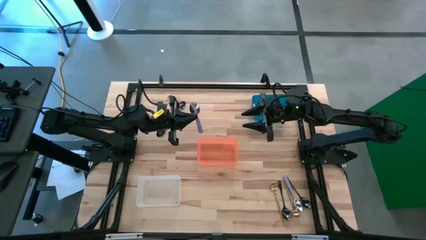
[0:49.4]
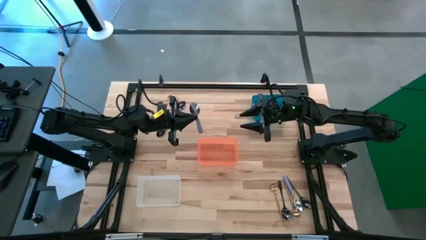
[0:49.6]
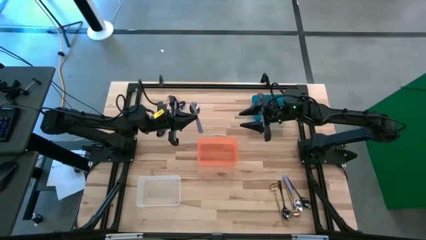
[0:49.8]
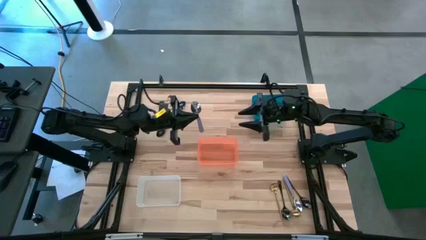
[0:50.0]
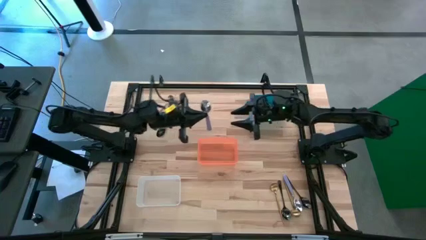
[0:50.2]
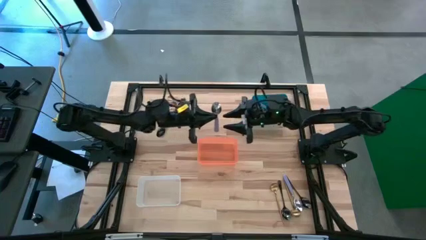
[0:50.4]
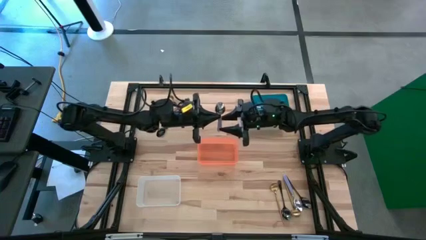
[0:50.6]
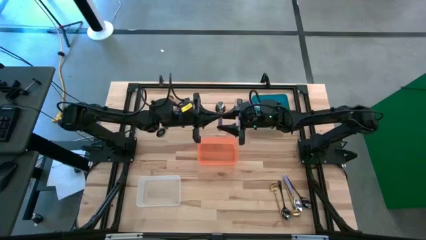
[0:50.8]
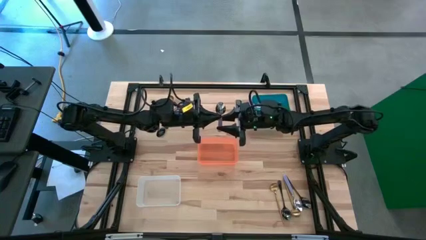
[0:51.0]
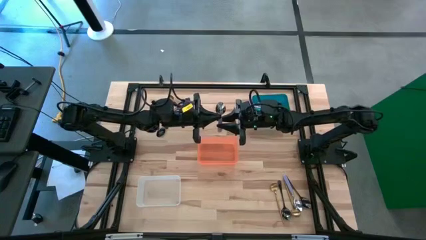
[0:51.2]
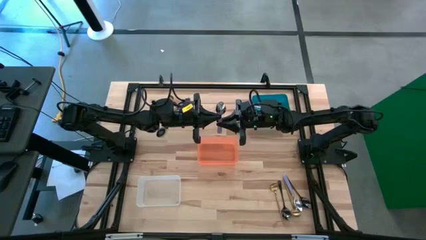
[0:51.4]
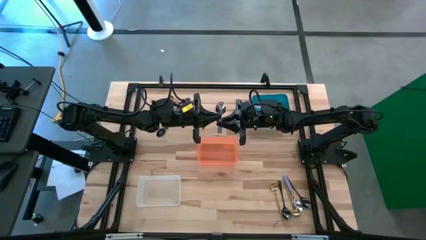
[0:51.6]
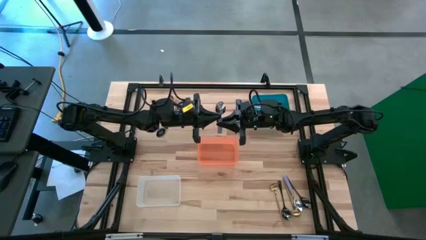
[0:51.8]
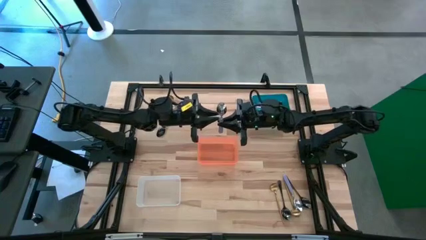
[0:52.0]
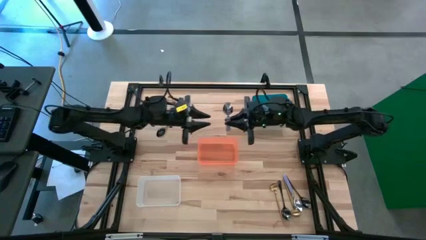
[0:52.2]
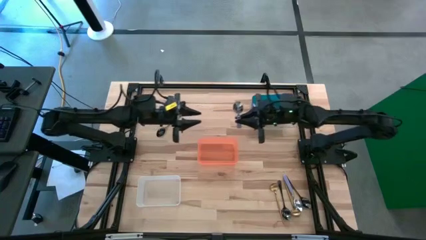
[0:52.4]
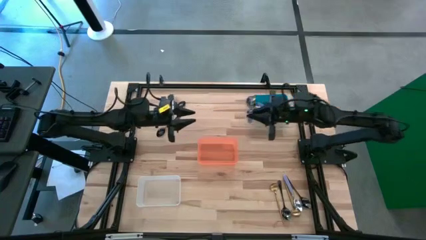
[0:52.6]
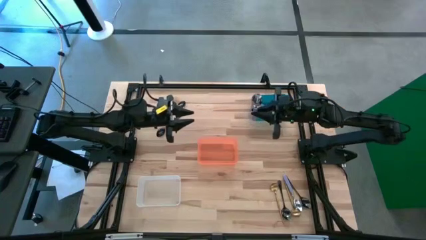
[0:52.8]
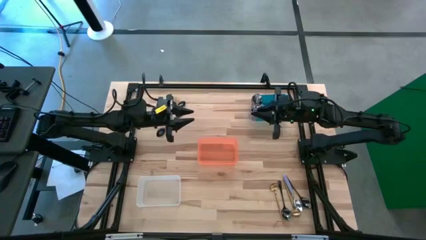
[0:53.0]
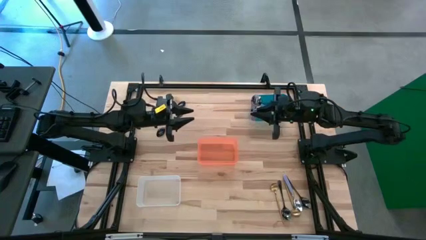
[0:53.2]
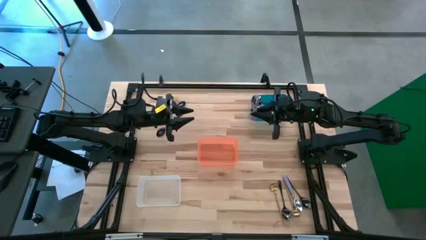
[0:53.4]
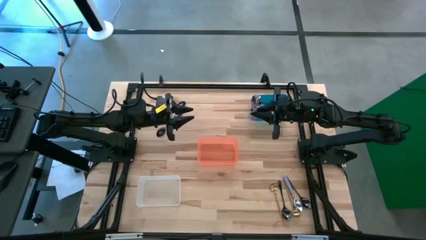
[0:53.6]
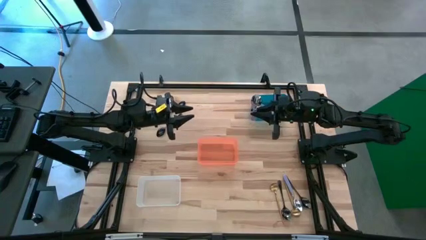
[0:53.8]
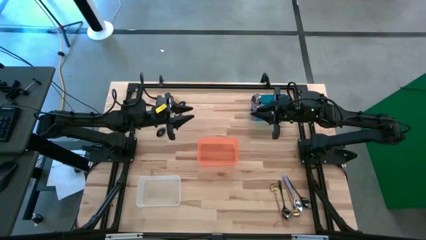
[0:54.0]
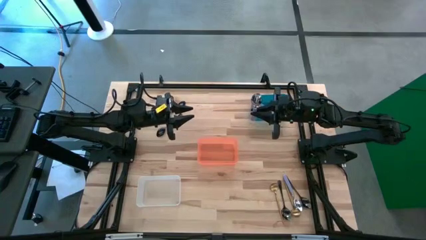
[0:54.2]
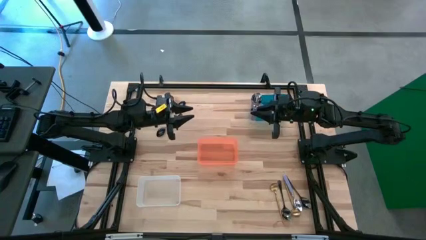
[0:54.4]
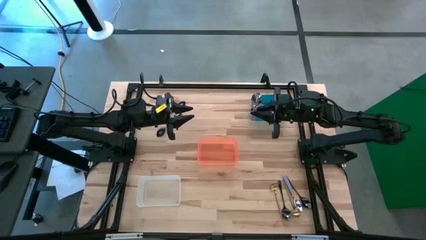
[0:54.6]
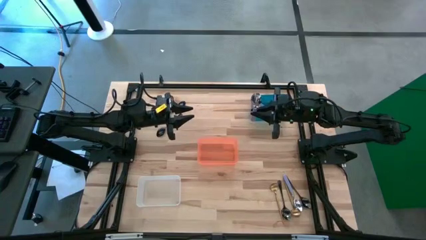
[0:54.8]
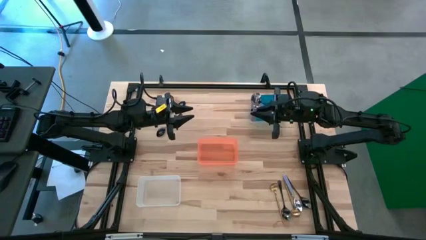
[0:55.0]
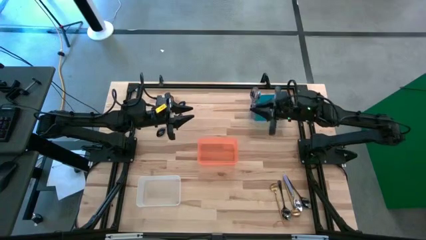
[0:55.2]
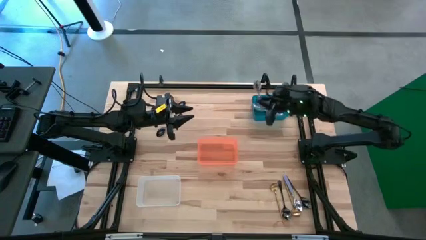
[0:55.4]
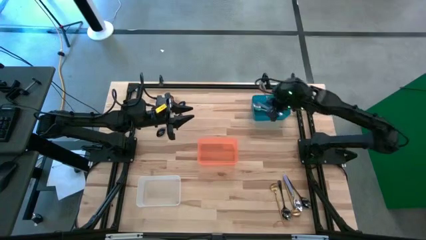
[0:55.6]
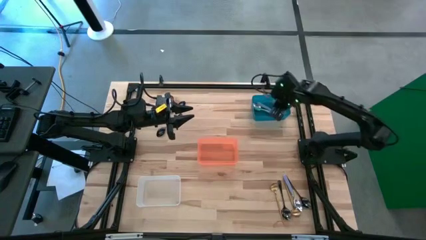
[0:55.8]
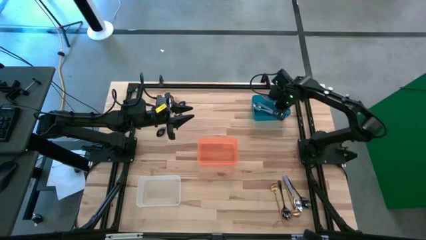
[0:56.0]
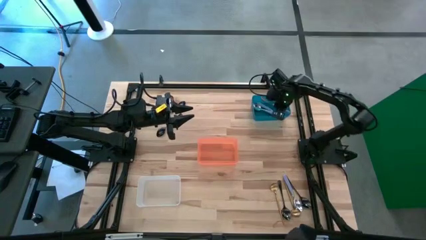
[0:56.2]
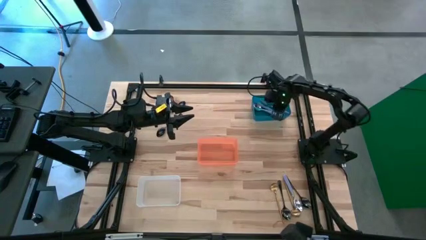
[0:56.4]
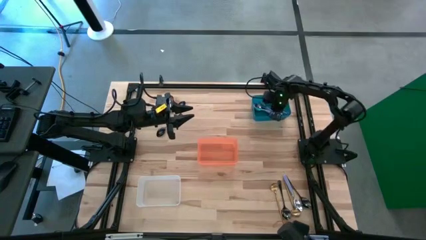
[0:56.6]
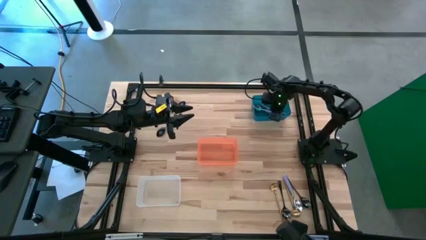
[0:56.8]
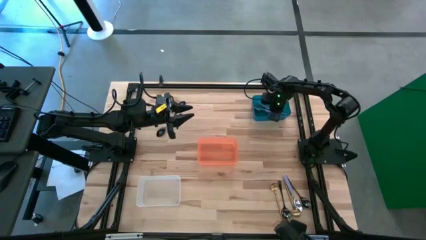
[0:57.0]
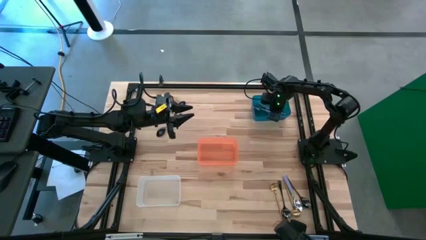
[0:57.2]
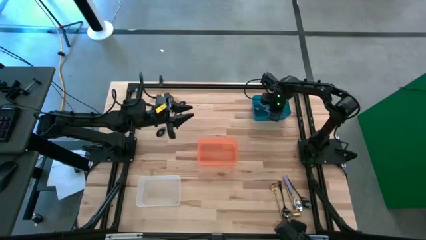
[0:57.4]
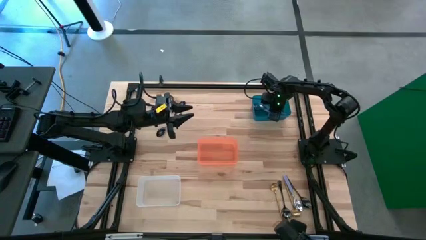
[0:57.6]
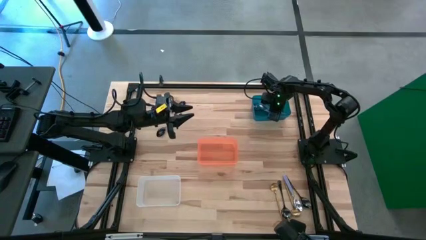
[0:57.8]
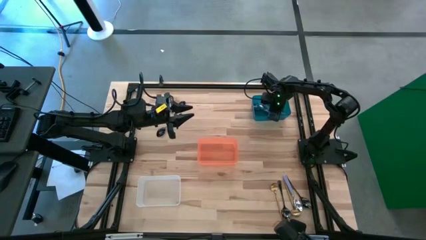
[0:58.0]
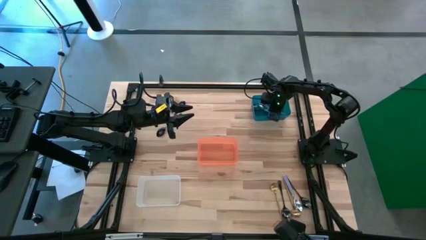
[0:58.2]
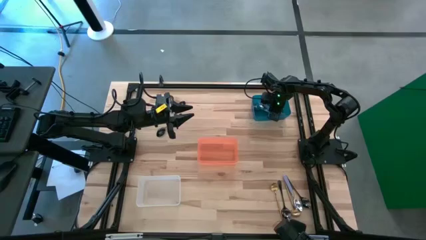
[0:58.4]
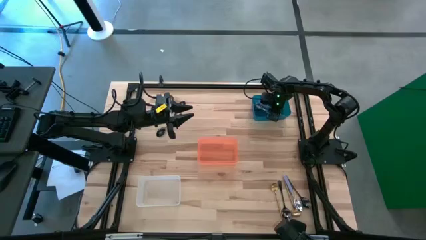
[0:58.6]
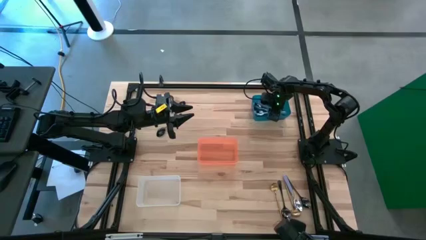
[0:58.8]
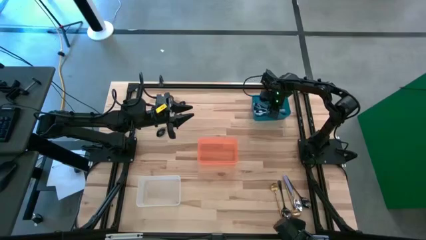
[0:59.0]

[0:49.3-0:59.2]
Task: Sort silverware by color (type)
Put the top violet spoon into the blue bin

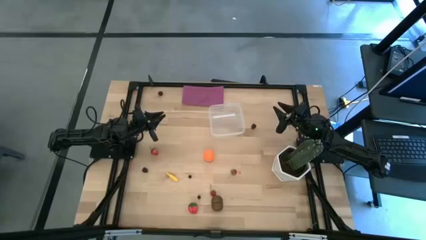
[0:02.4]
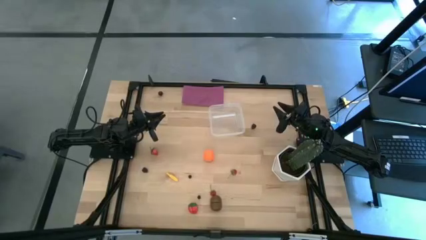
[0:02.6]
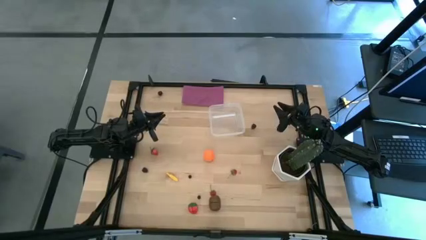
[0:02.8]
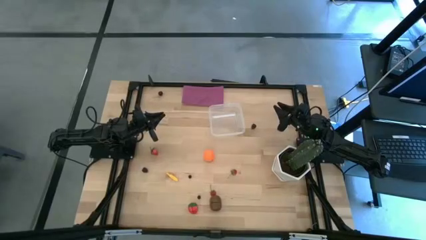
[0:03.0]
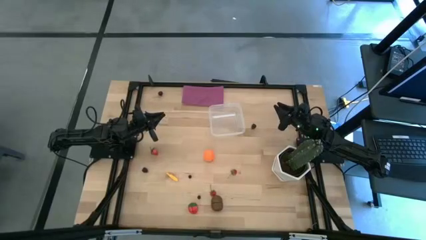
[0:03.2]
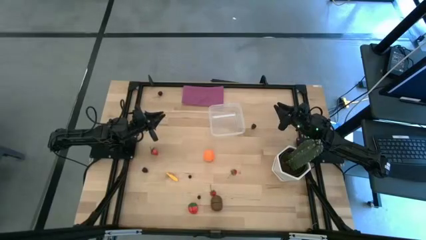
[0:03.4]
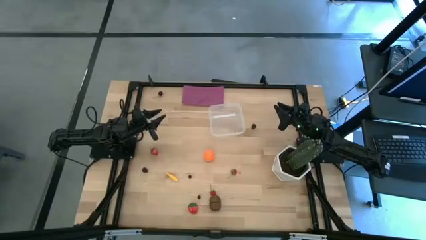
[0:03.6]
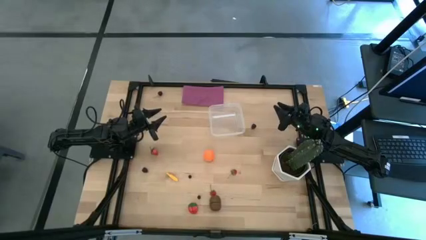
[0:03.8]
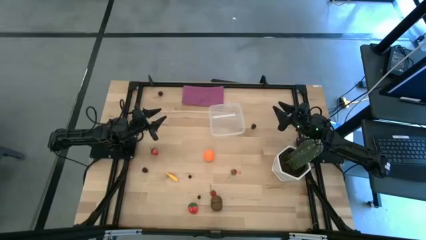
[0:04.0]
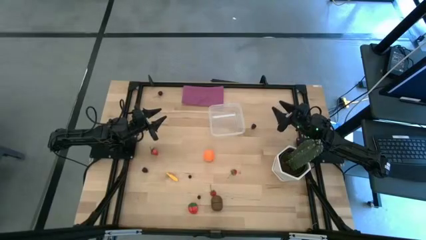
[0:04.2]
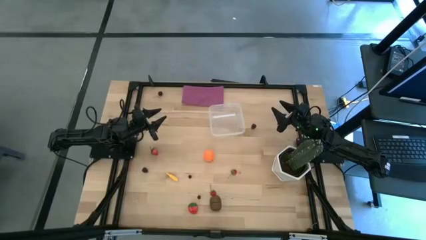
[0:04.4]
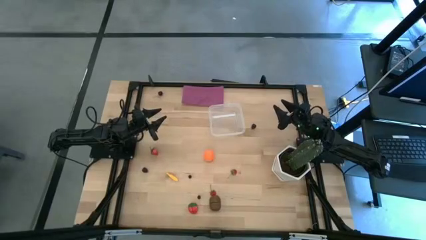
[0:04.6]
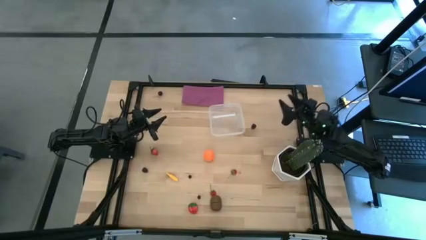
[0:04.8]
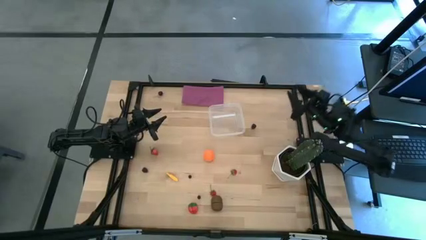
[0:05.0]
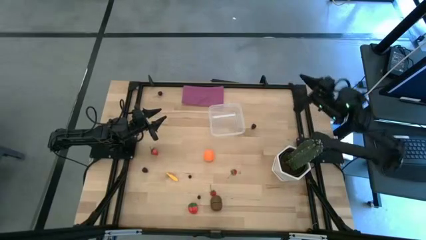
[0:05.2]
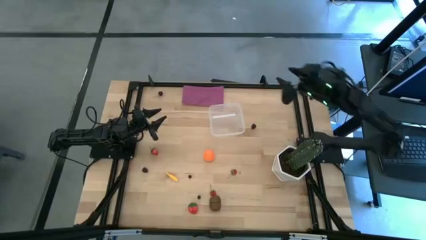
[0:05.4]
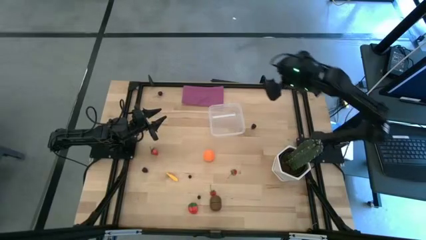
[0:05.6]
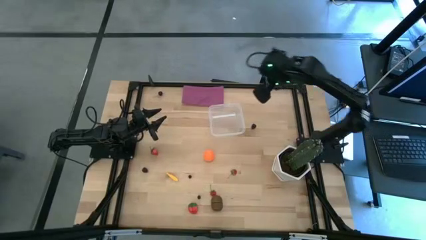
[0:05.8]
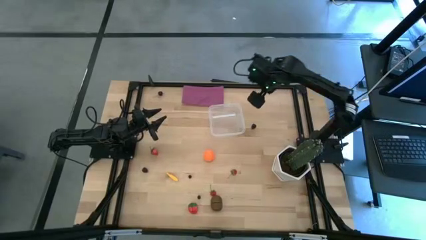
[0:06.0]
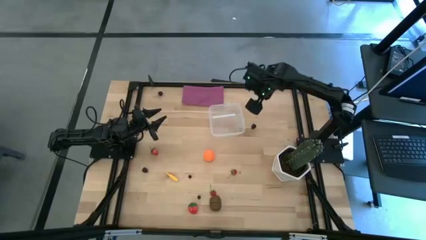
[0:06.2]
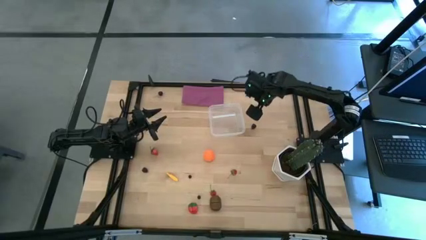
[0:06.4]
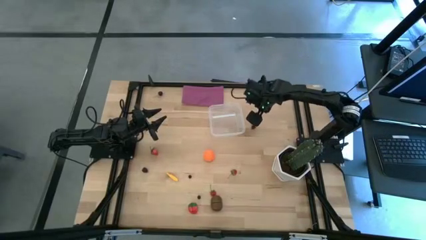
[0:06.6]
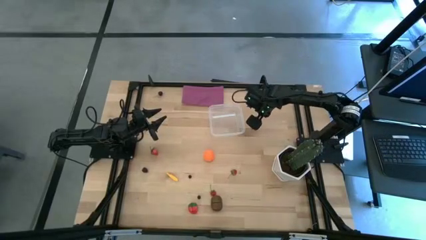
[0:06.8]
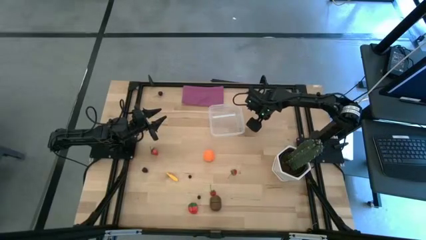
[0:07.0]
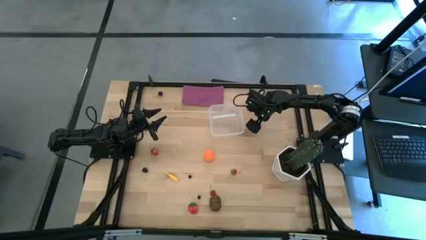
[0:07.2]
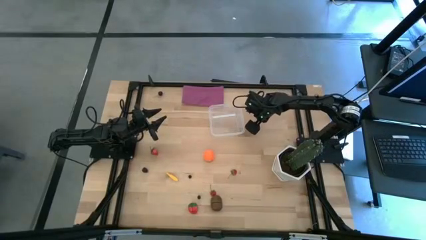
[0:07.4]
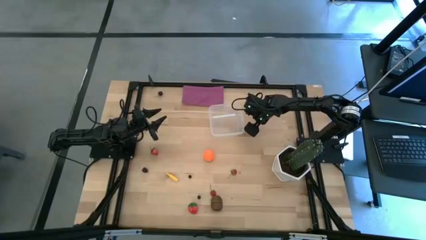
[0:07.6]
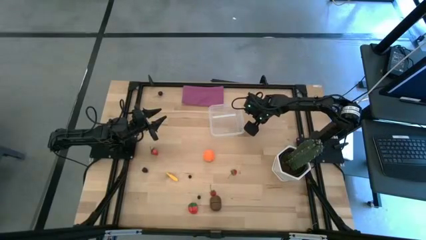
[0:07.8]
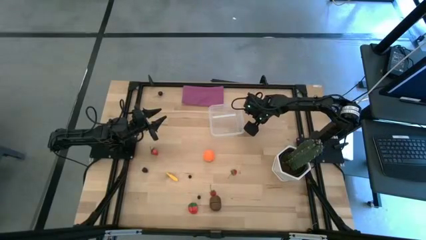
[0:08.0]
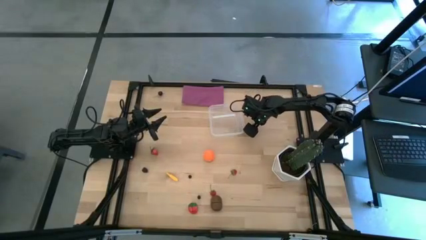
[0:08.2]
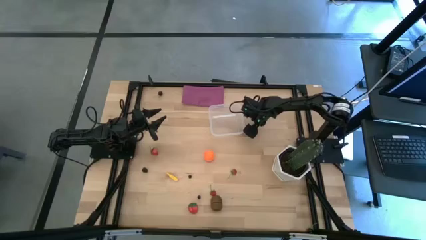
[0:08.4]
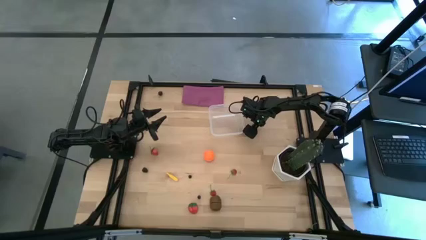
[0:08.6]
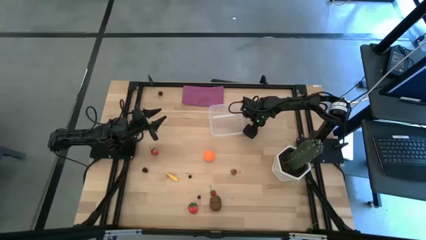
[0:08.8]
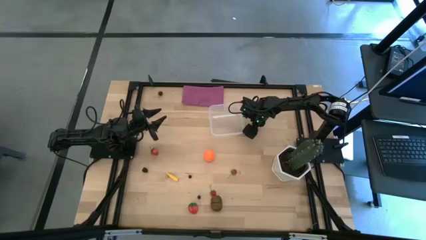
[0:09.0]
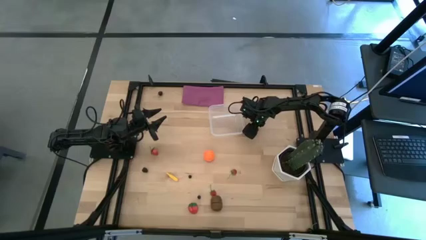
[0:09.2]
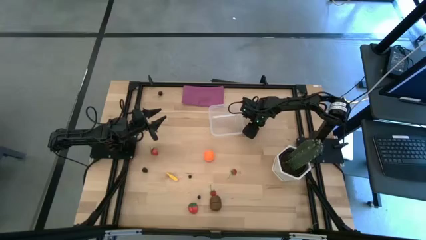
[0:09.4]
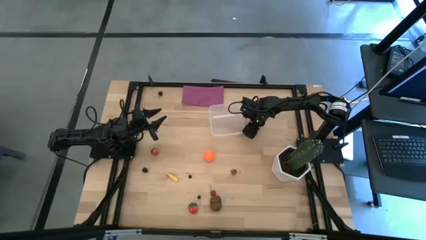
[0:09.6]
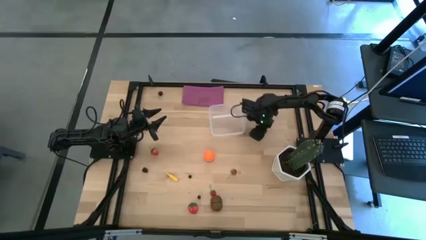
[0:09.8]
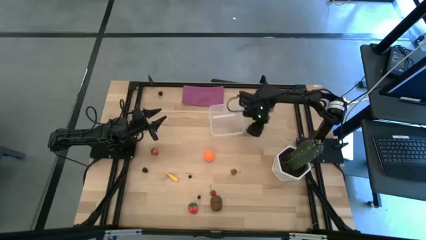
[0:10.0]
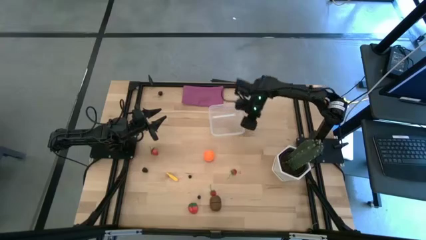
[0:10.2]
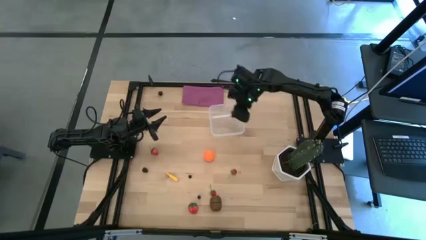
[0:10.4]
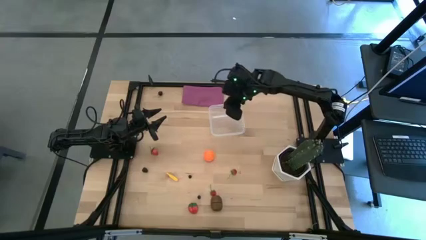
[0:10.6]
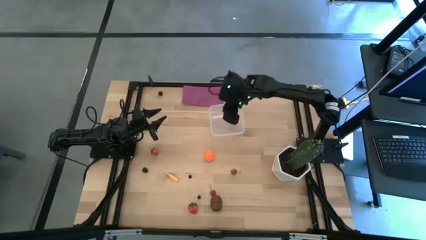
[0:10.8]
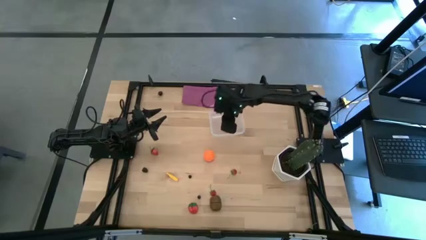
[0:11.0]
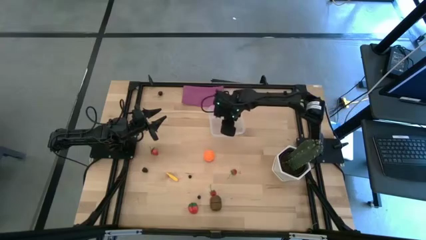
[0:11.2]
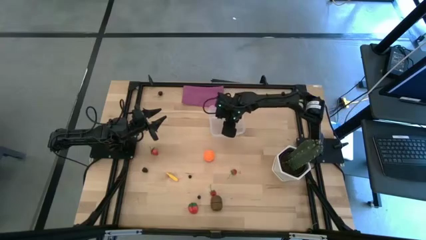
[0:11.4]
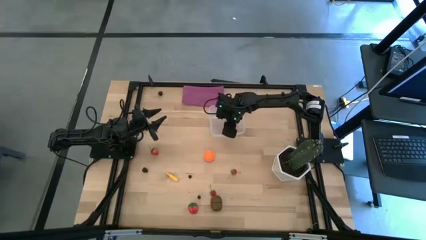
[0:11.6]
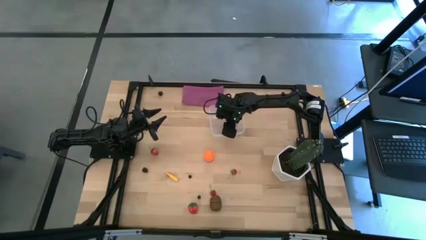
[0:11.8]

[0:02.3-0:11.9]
Task: Pick and placing Produce into tupperware
Put the right blackberry into the transparent bin
